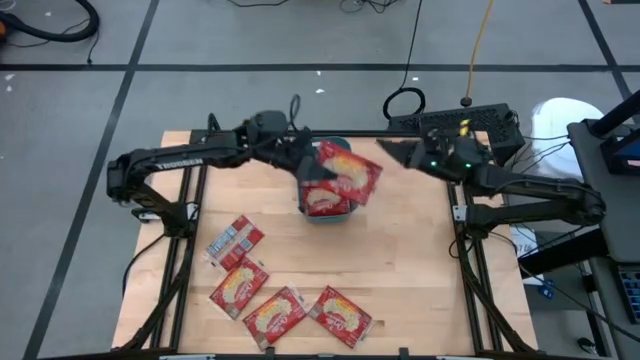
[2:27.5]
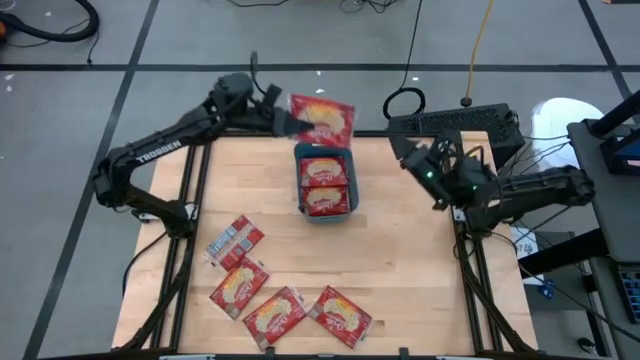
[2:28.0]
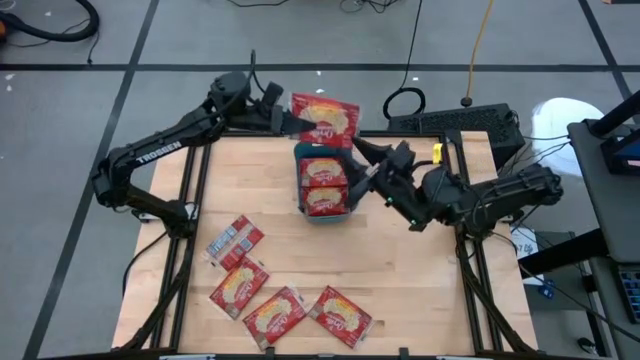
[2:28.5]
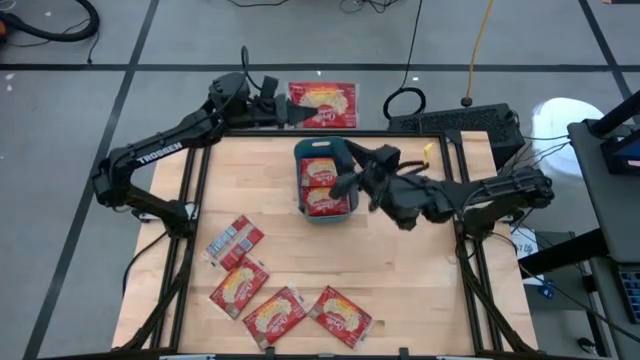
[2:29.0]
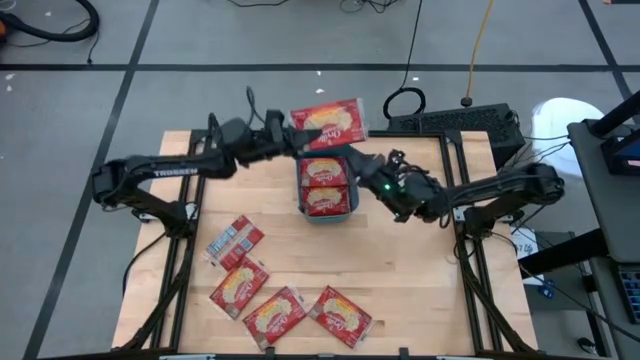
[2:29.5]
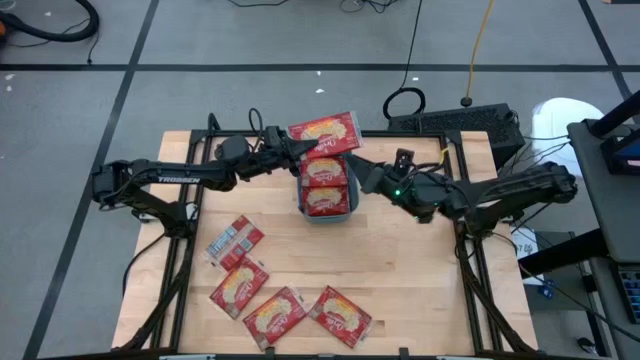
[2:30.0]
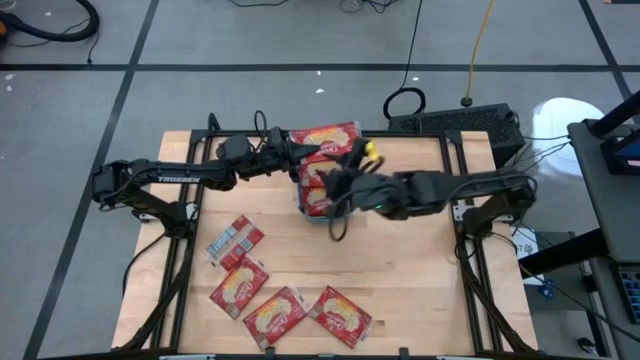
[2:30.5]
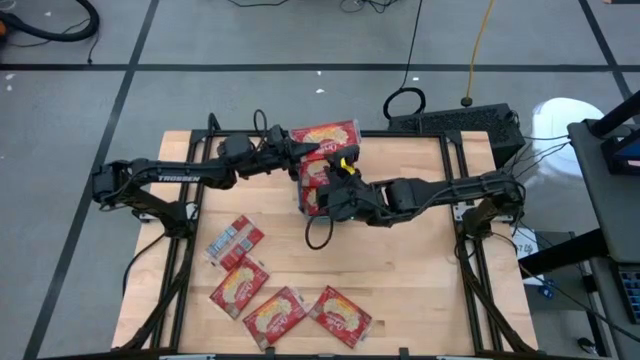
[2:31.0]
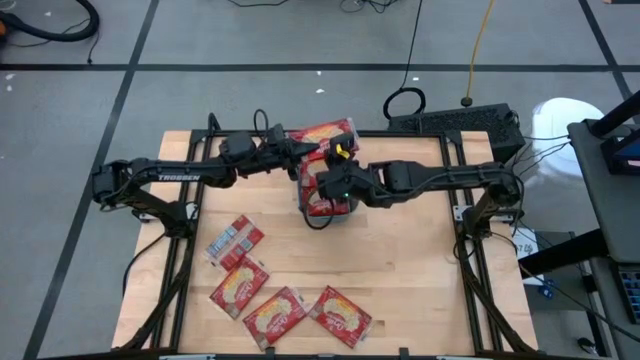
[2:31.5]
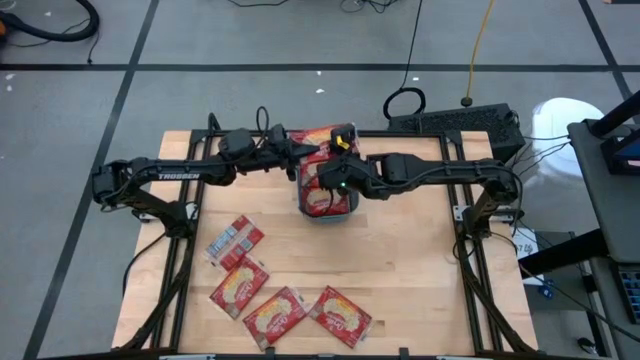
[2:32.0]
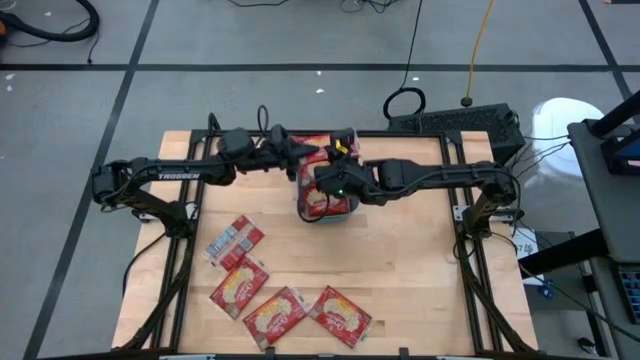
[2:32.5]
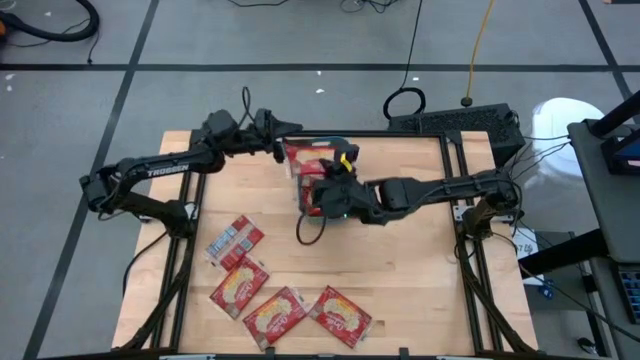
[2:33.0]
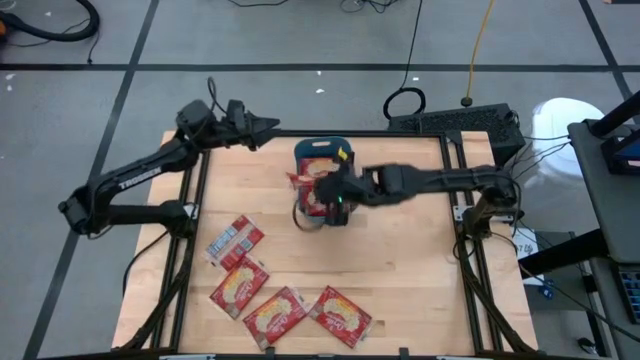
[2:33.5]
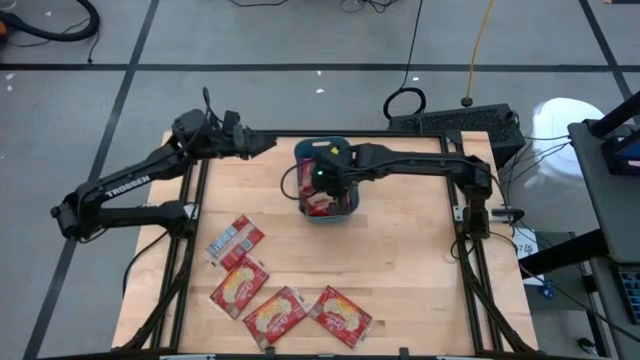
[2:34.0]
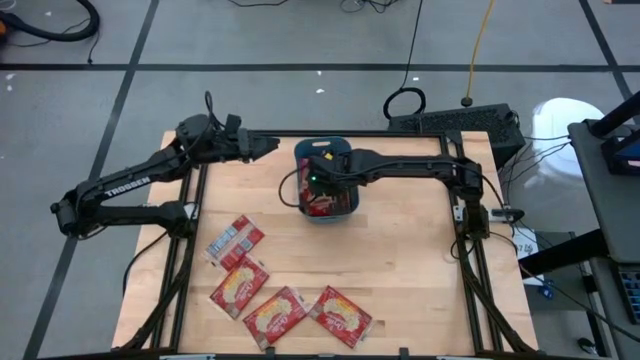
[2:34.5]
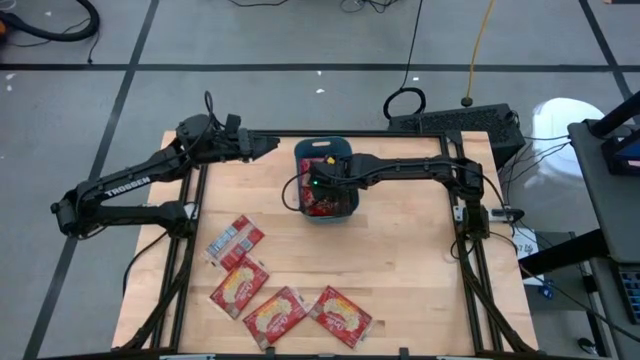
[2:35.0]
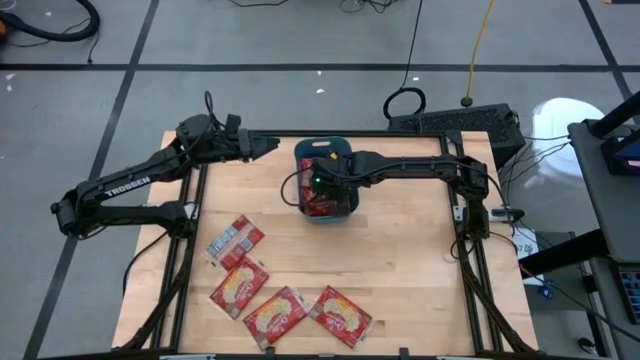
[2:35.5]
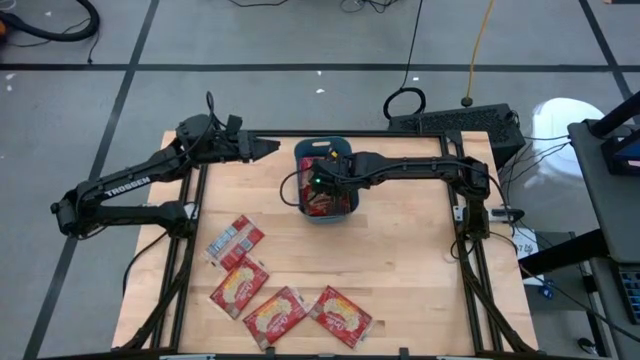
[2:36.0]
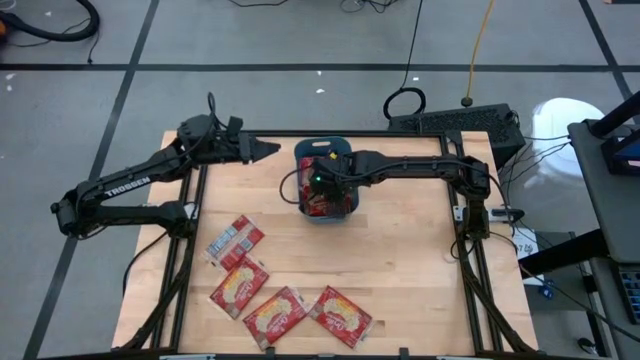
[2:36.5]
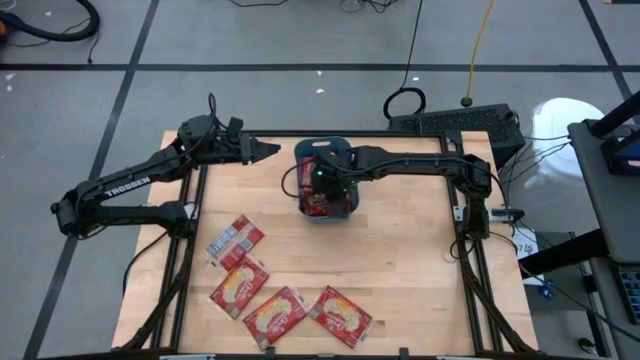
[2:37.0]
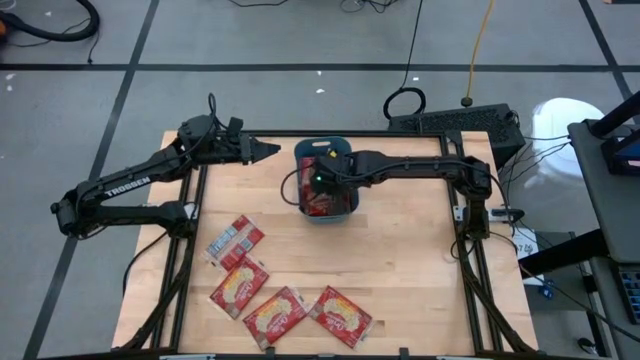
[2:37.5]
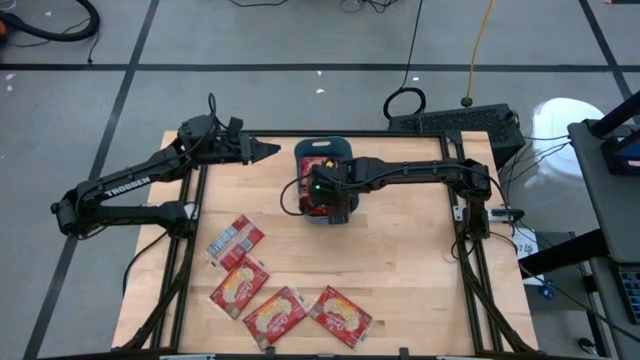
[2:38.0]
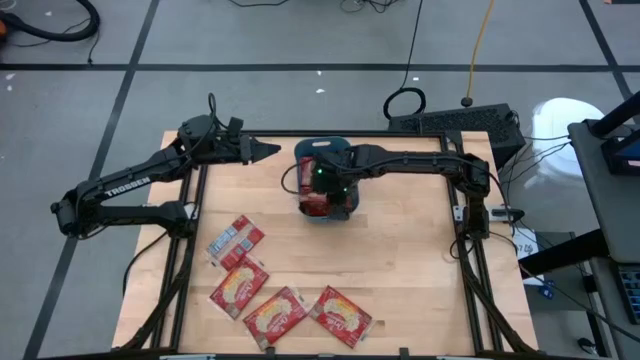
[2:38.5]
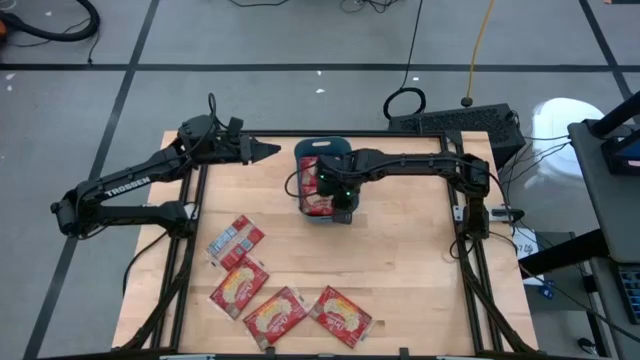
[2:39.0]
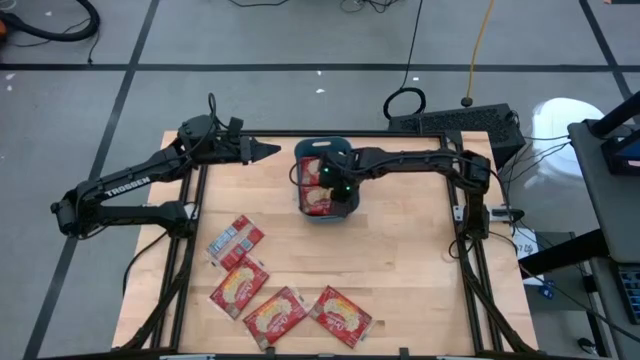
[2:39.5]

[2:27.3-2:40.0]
Task: Sort popcorn bags into baskets
Put the red popcorn bag into the blue bin

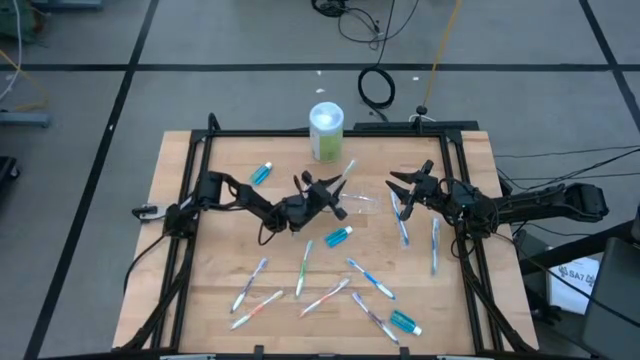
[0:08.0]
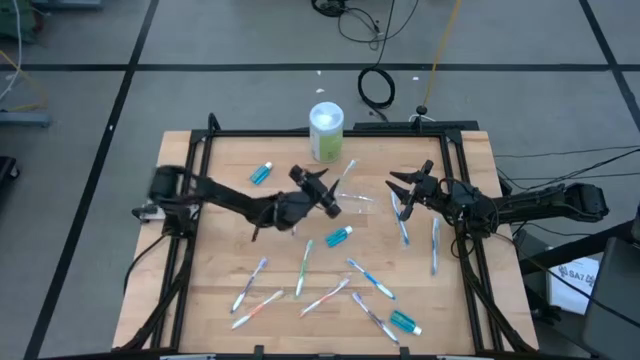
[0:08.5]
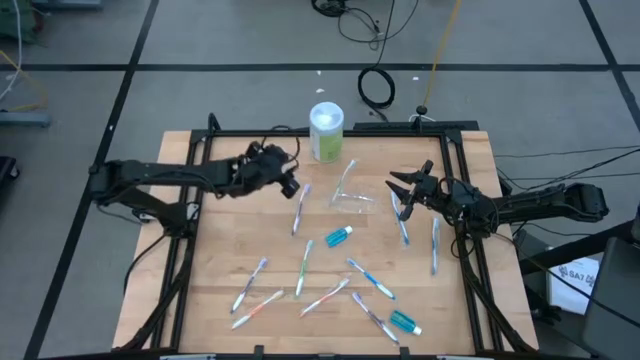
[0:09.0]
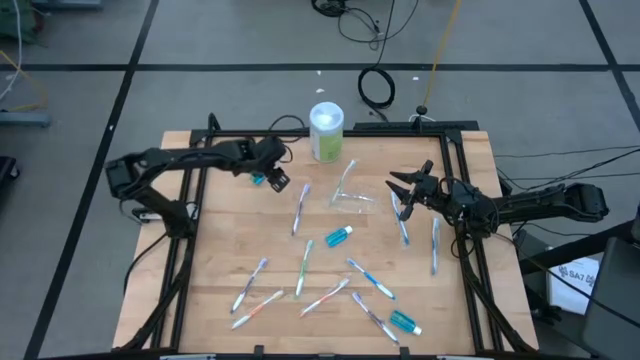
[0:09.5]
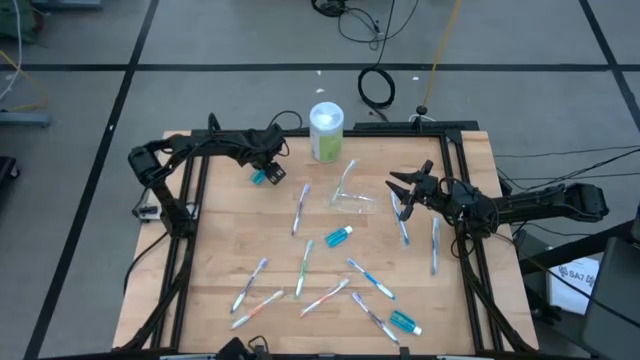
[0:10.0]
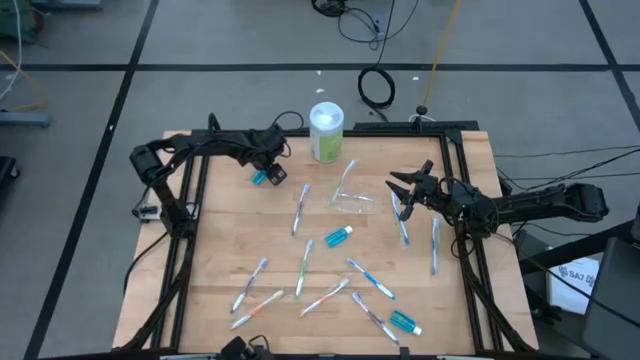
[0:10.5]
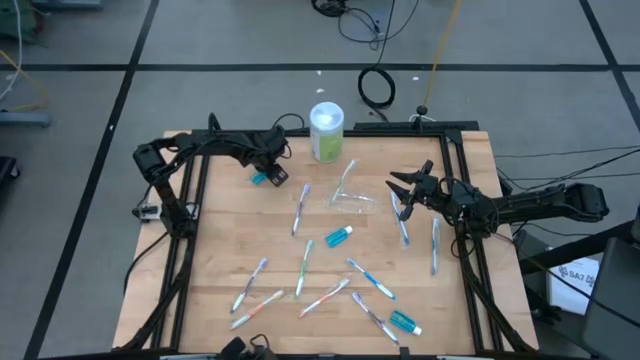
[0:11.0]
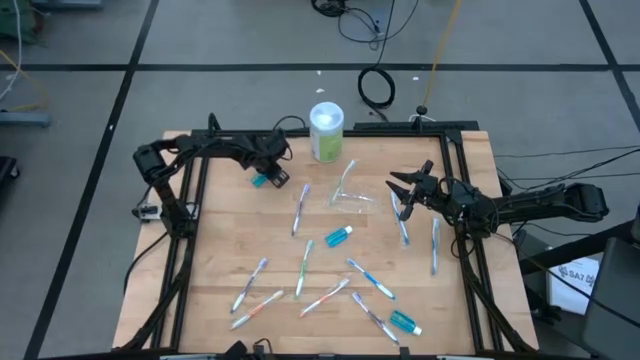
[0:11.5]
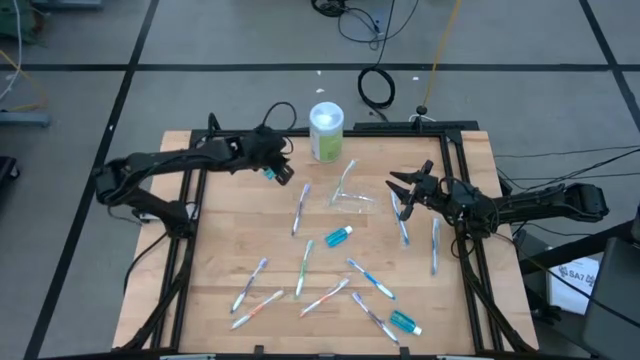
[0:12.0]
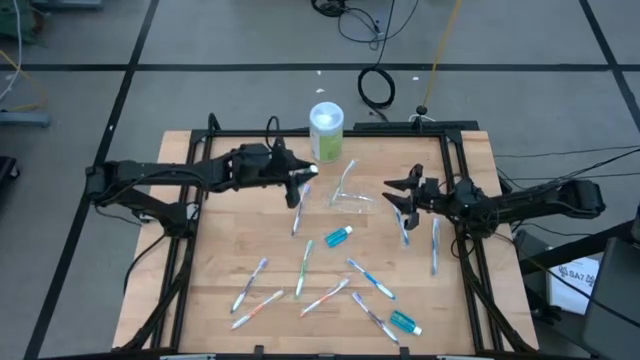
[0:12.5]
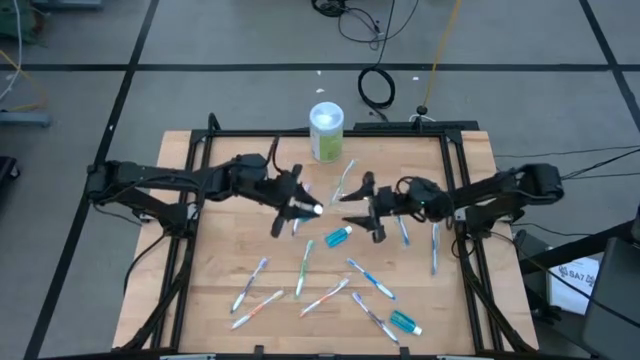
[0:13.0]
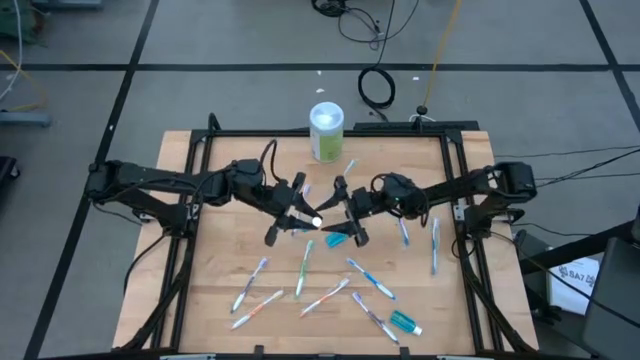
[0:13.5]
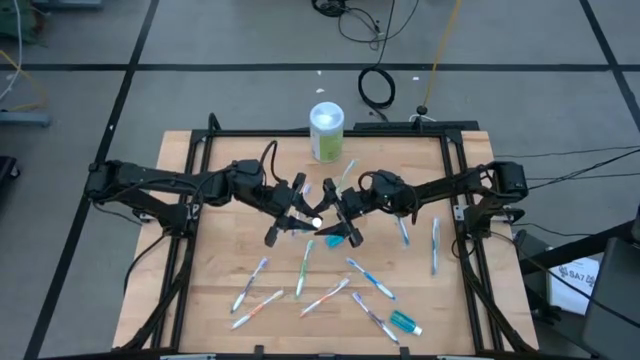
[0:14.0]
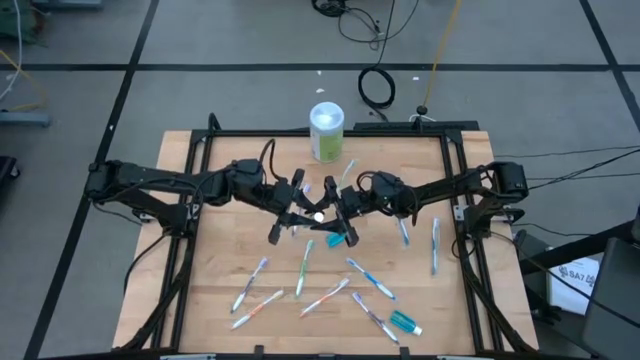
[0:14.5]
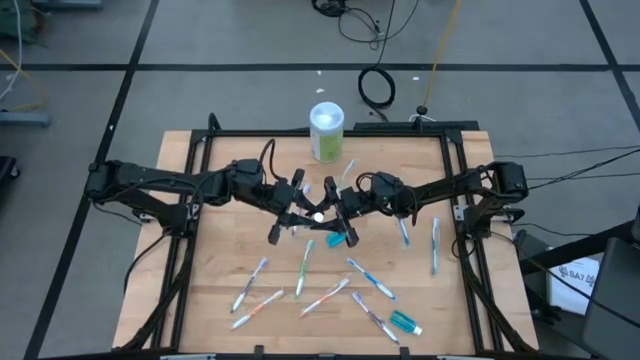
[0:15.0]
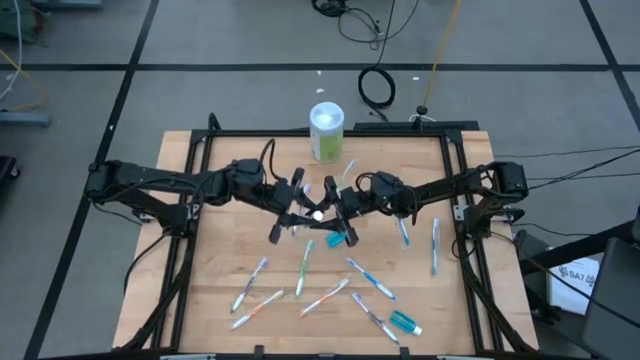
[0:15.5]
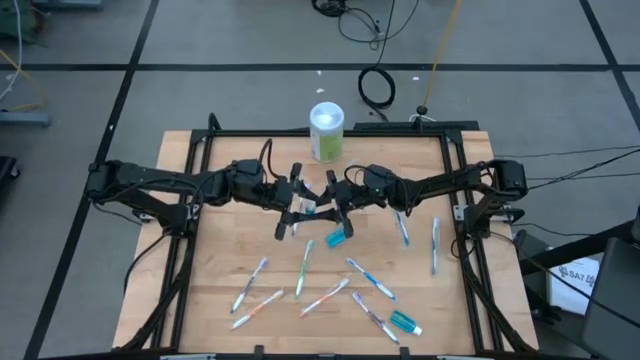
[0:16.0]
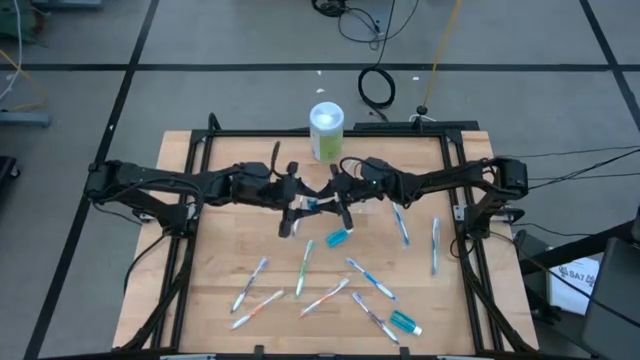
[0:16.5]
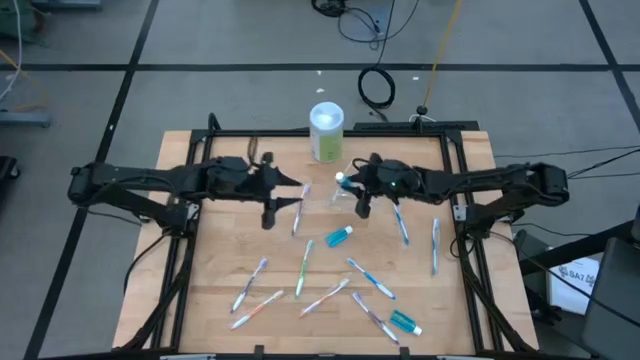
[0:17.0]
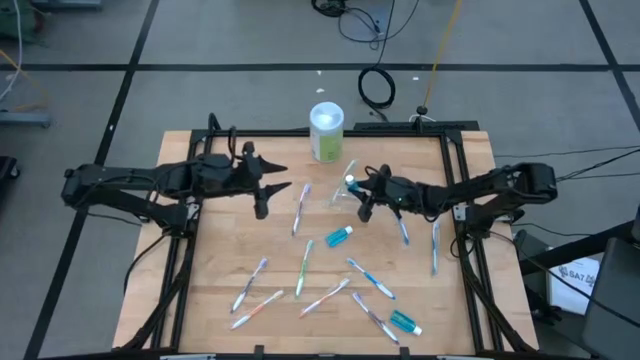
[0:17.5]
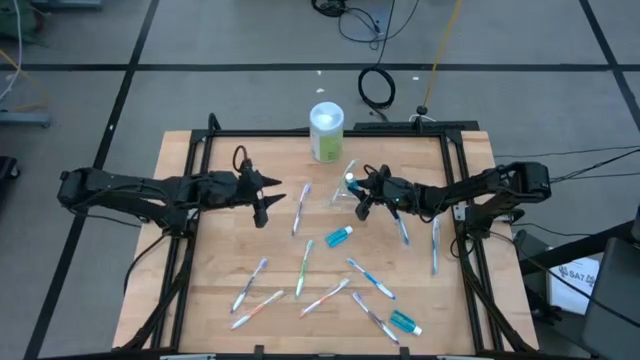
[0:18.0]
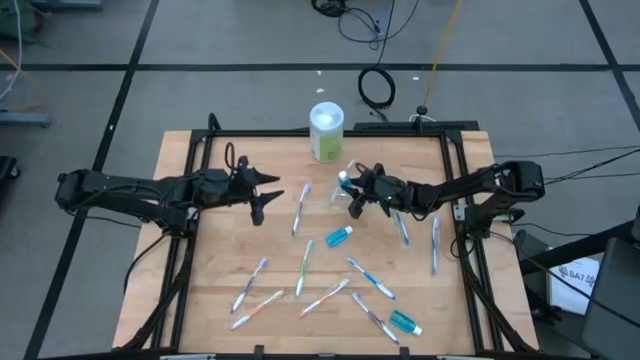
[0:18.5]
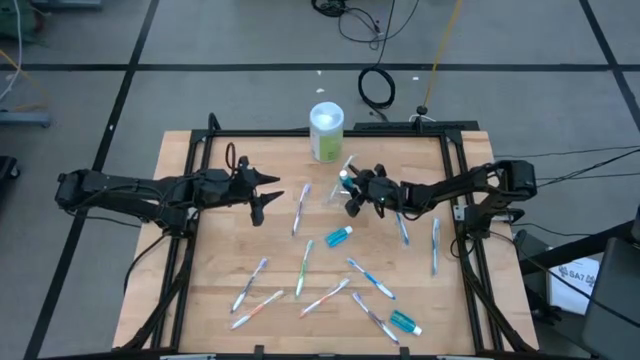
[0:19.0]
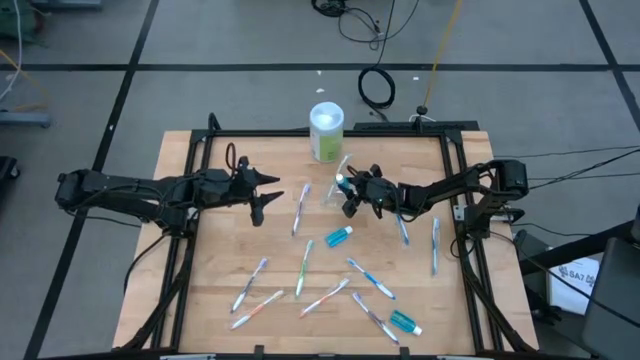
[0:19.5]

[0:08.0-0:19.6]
Task: Pick & Place toothbrushing station
Put the top left mouthwash into the transparent organizer
